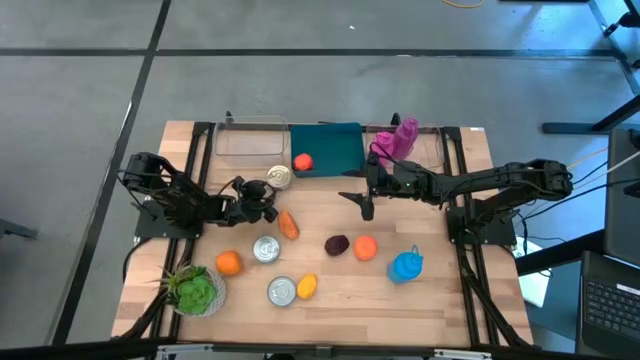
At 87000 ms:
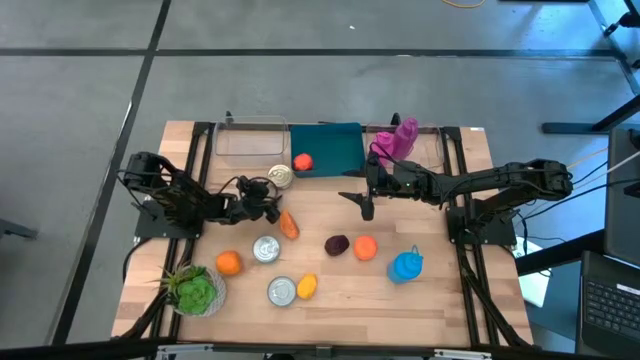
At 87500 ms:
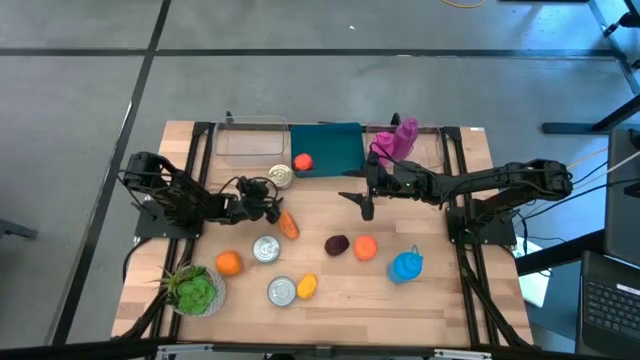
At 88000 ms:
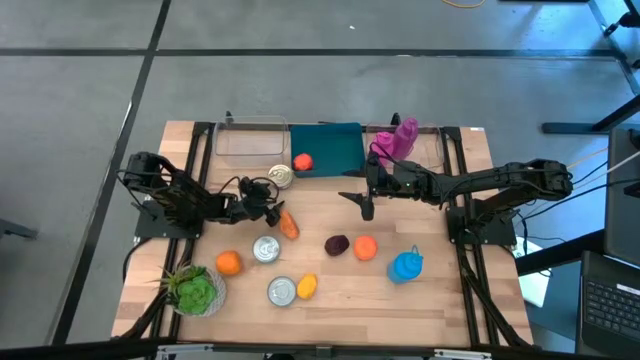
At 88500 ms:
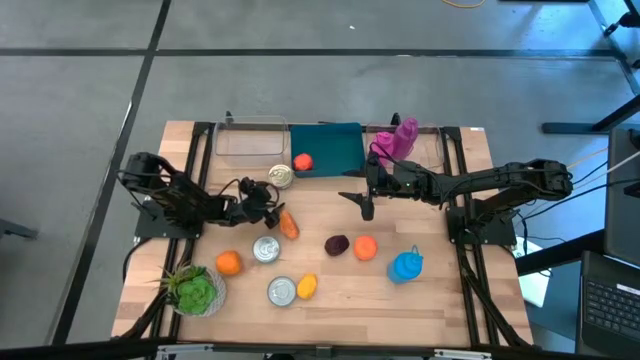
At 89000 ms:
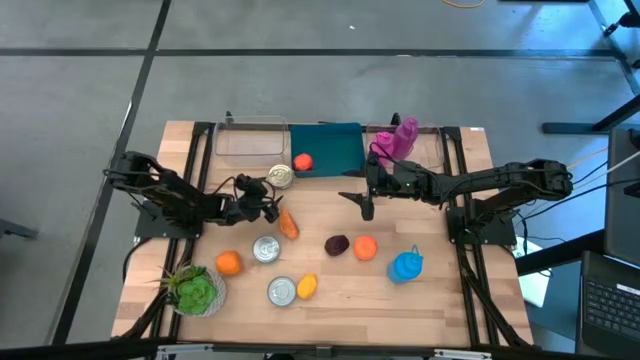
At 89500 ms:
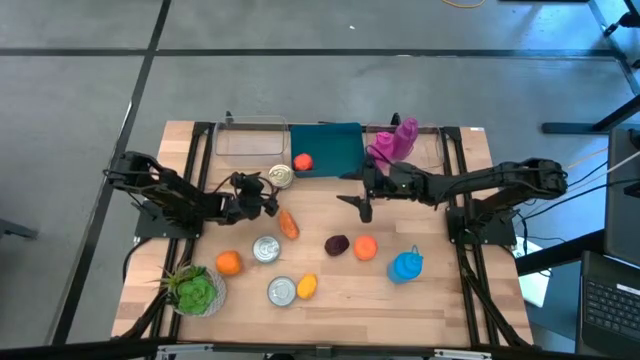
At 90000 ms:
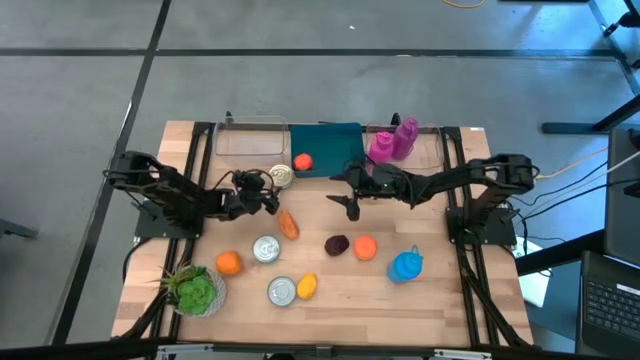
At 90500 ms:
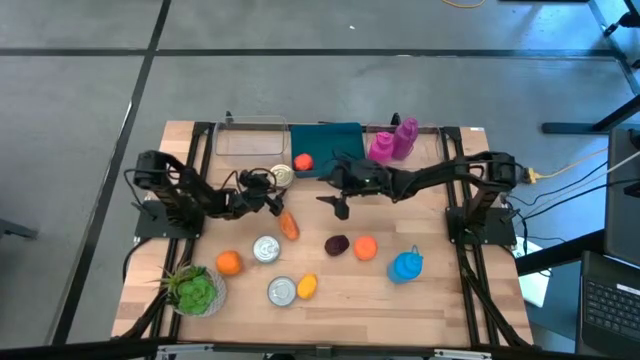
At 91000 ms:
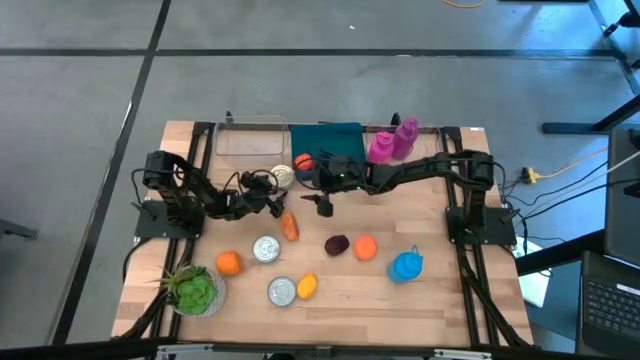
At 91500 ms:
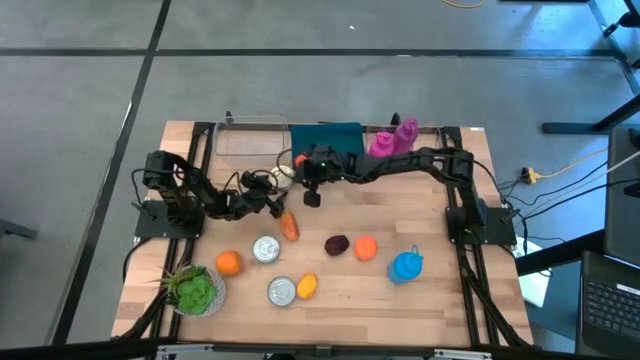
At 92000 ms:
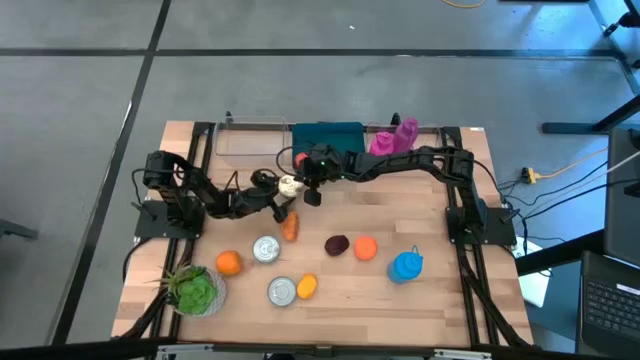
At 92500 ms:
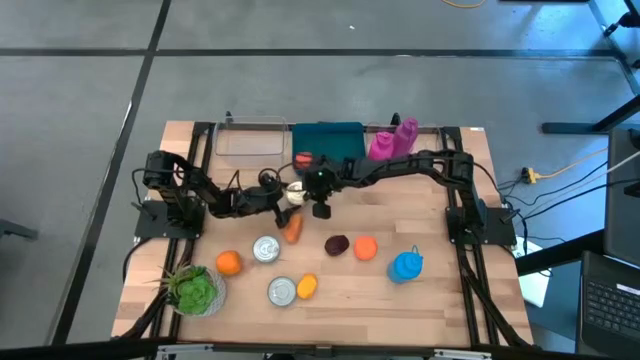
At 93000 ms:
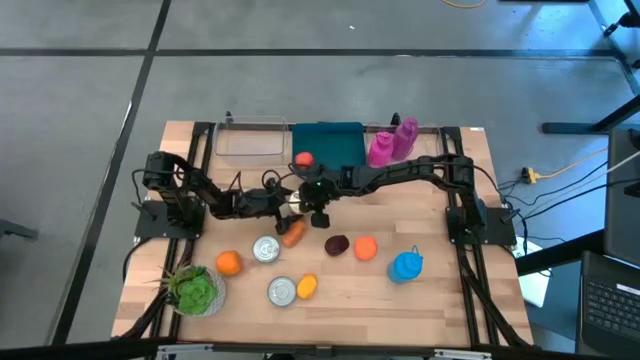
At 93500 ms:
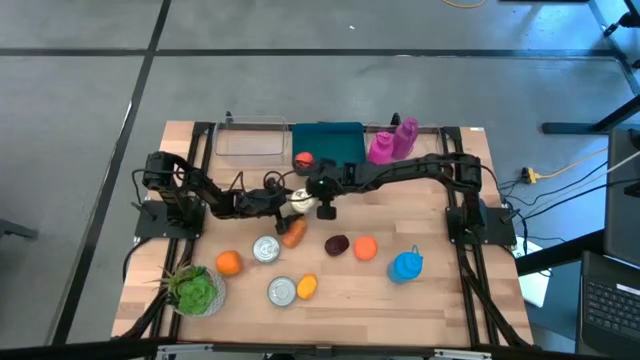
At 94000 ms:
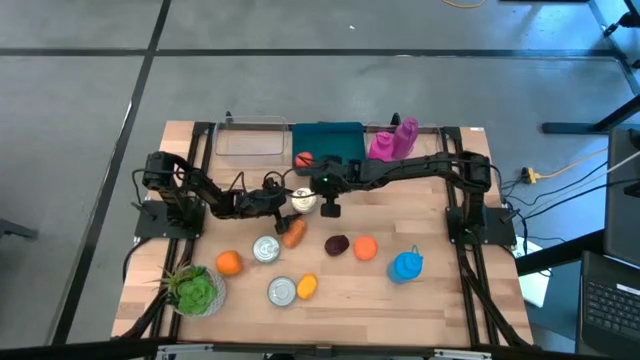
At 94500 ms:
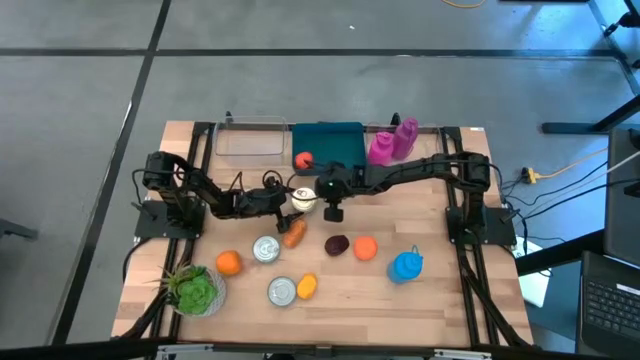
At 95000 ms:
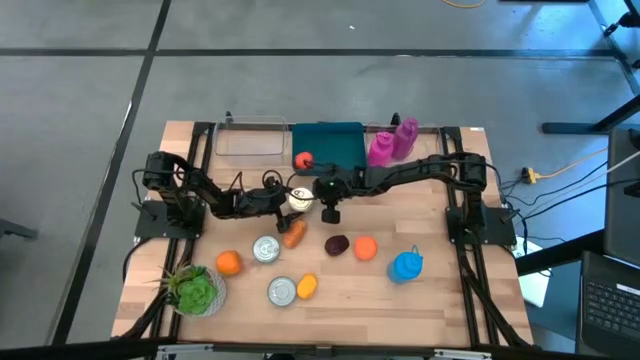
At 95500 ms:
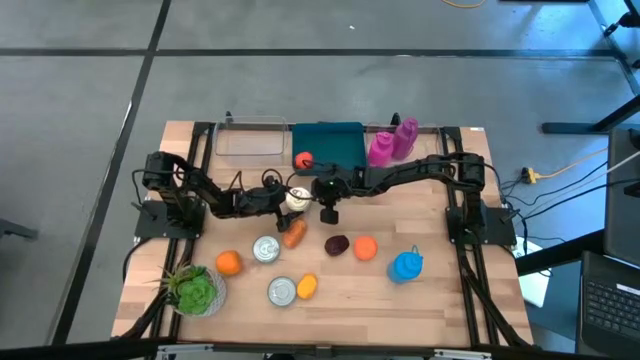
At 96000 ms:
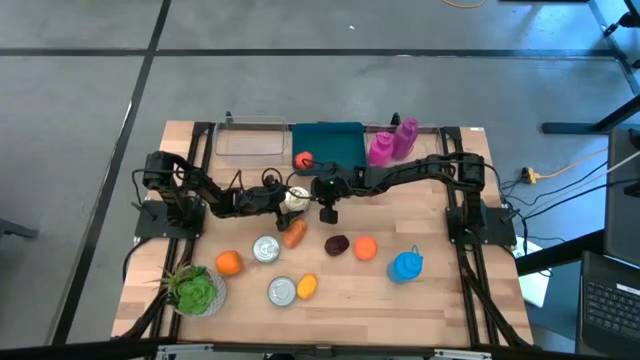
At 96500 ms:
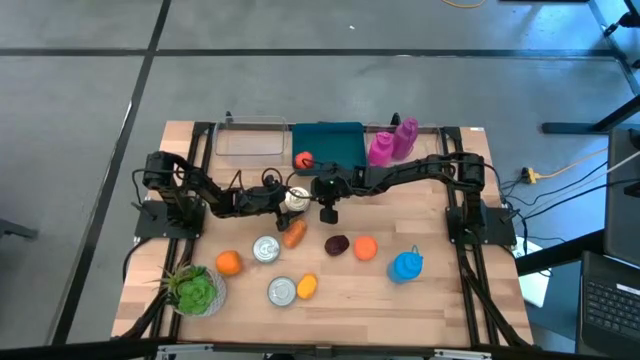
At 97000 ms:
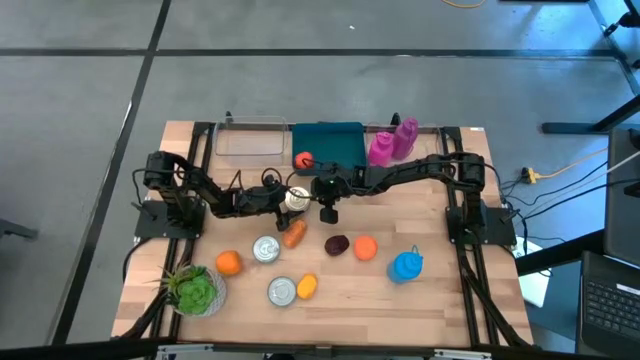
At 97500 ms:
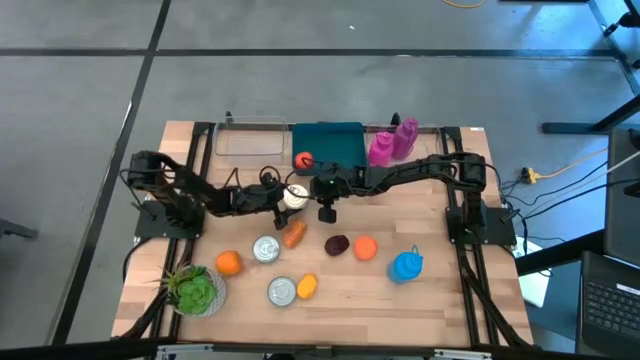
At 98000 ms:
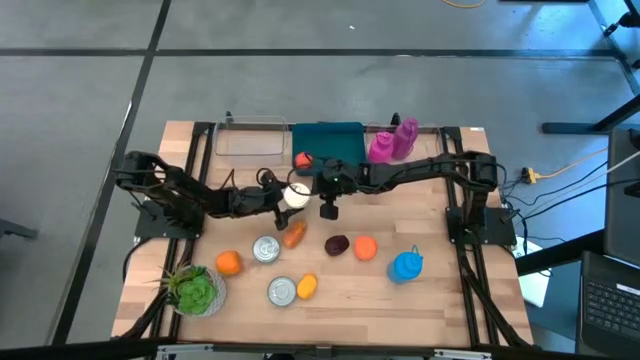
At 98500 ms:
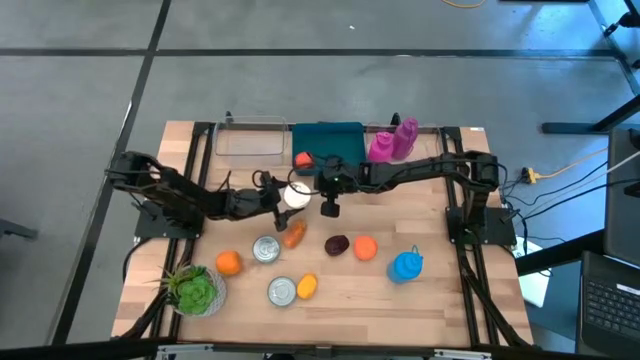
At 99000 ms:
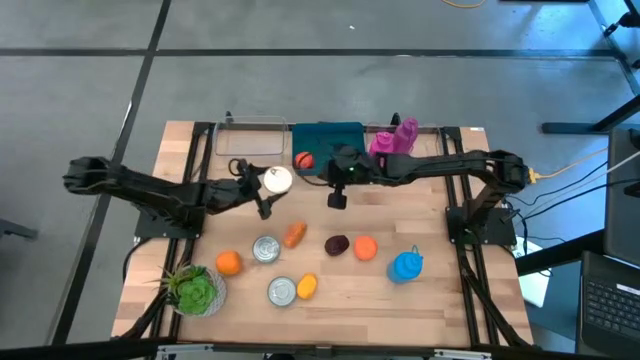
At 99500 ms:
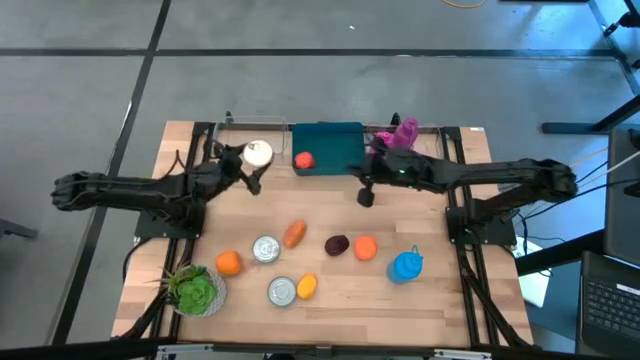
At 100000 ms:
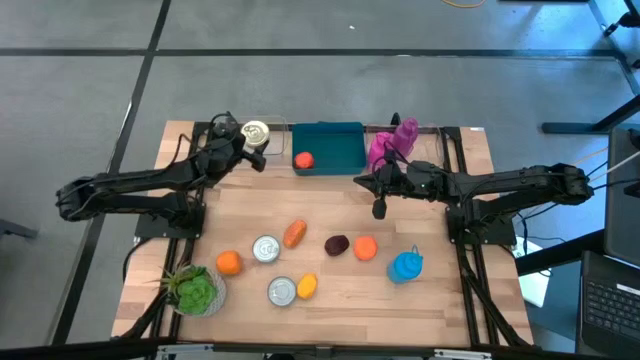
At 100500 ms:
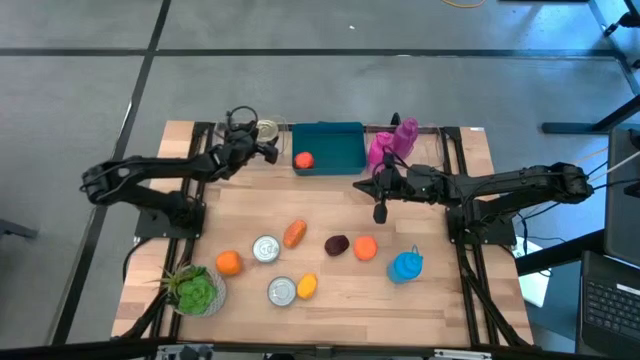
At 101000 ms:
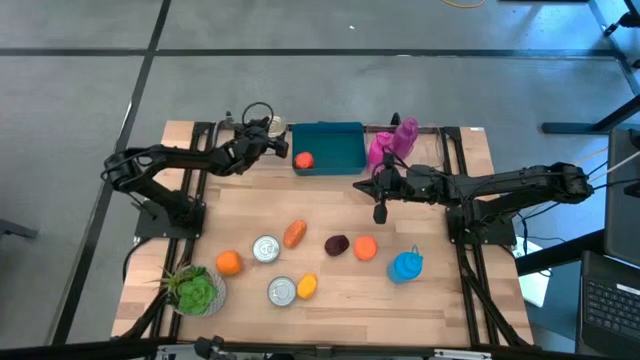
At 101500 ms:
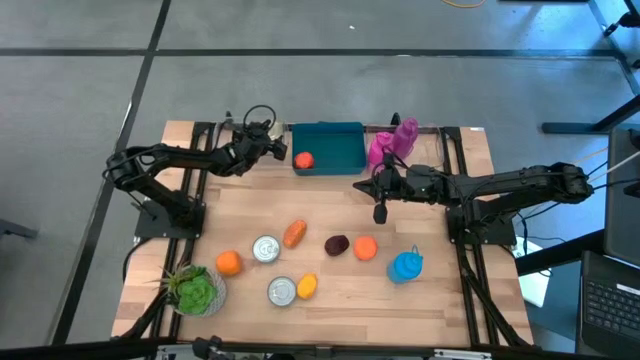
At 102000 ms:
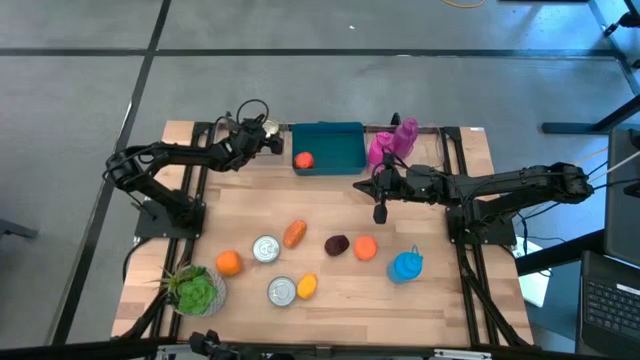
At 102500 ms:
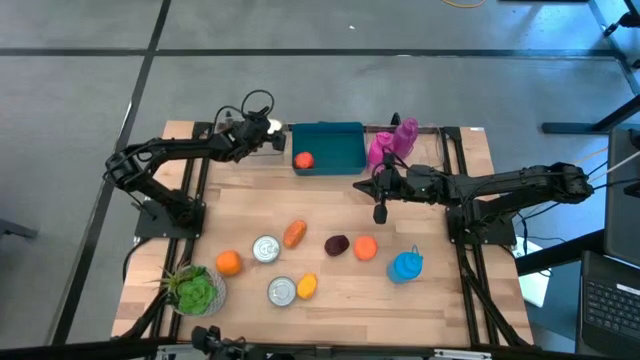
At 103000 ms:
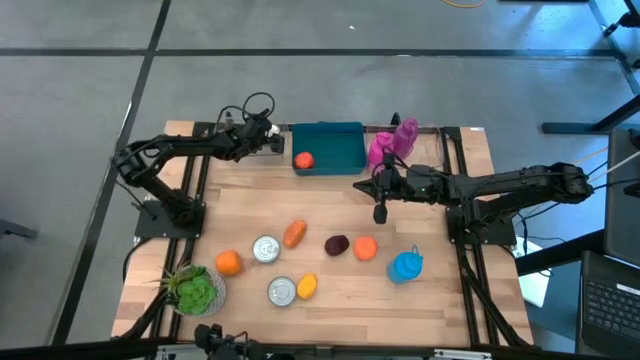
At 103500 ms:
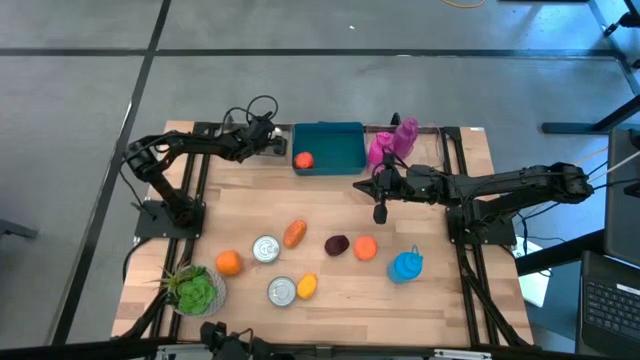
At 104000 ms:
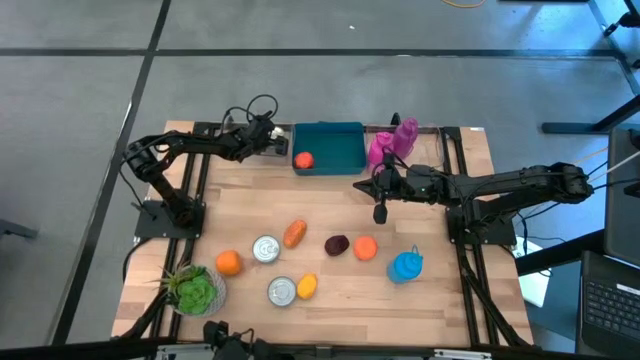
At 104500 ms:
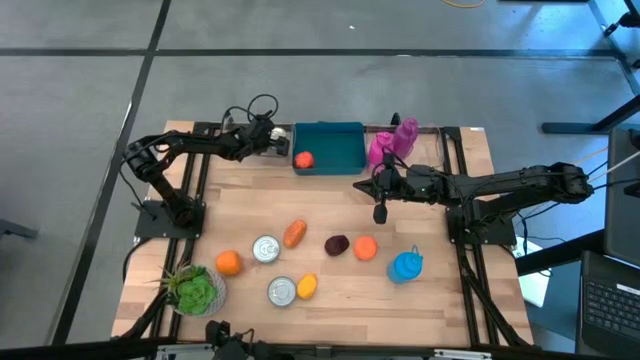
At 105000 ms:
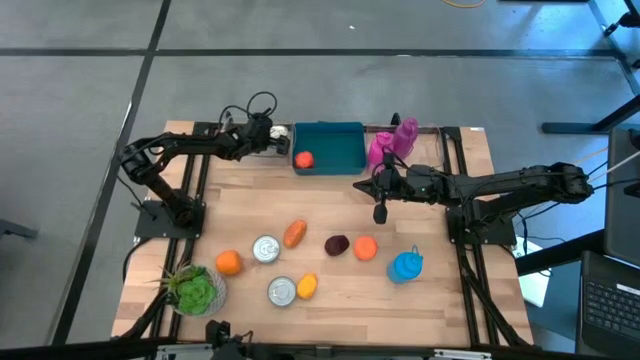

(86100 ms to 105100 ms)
Task: Pick & Place Food Item
Put the top blue pink tuna can into the left transparent bin

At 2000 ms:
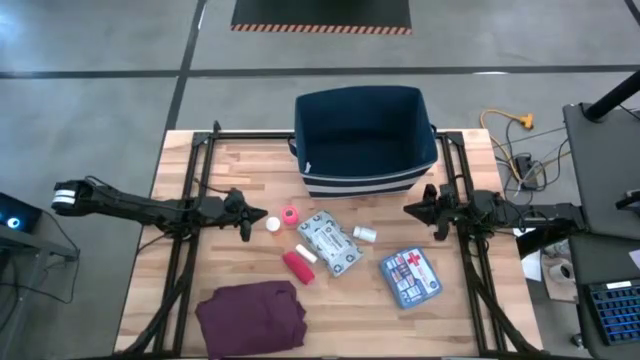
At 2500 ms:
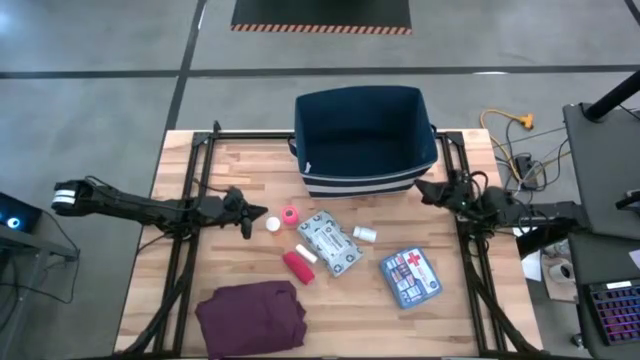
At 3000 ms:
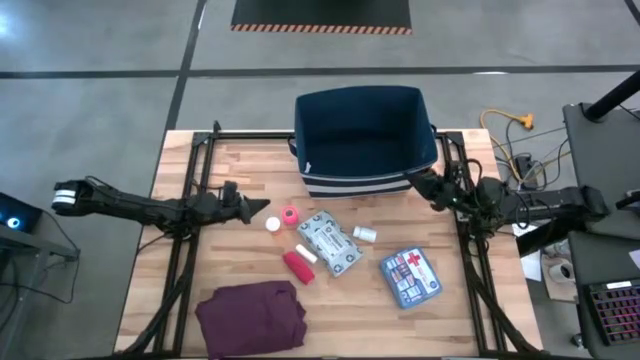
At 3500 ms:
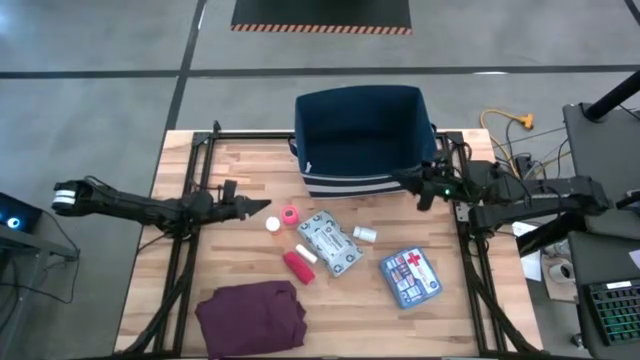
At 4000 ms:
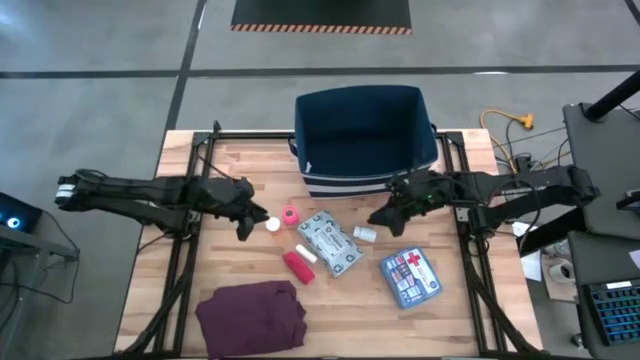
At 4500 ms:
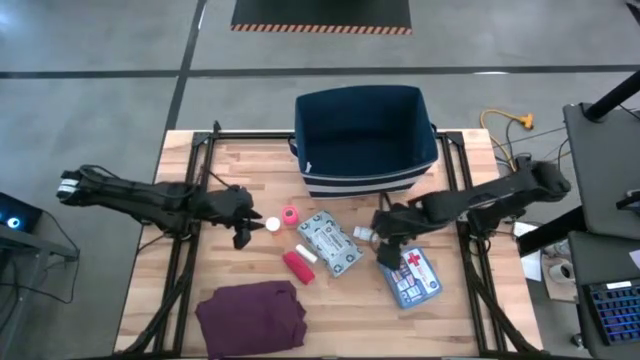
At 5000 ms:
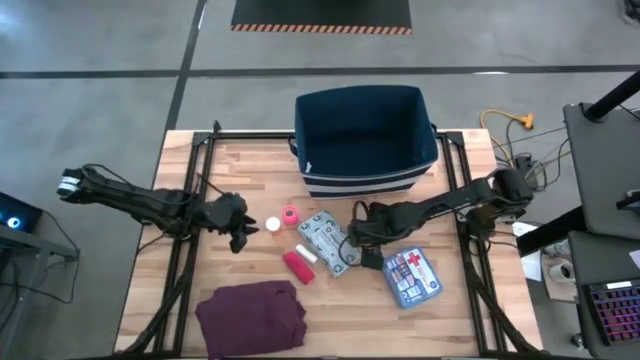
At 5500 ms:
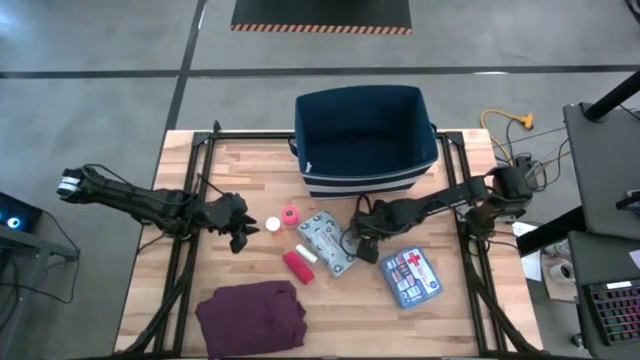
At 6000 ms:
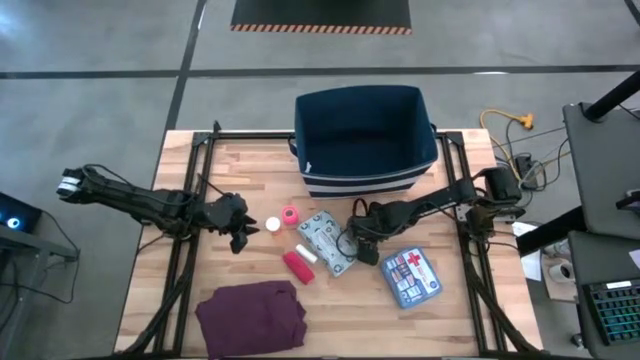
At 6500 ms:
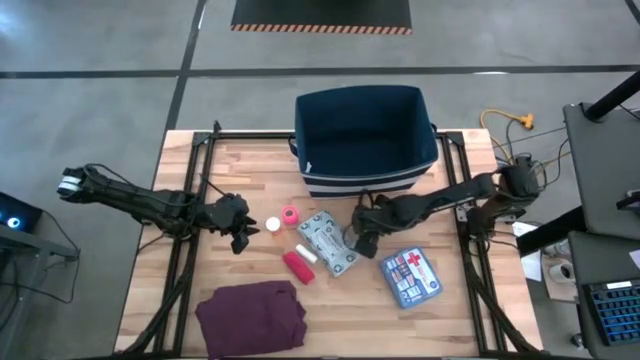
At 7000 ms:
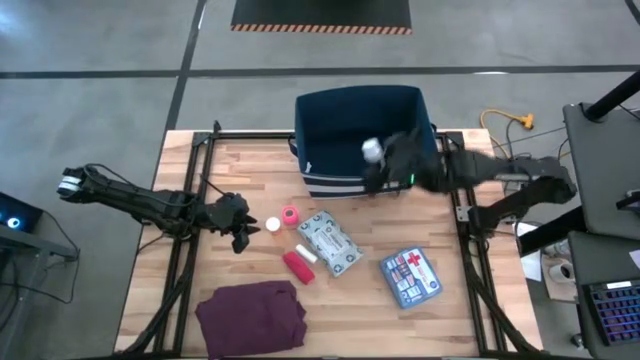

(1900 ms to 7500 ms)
Task: Pick & place medical supplies in basket/bin
Put the white pill bottle into the blue bin
